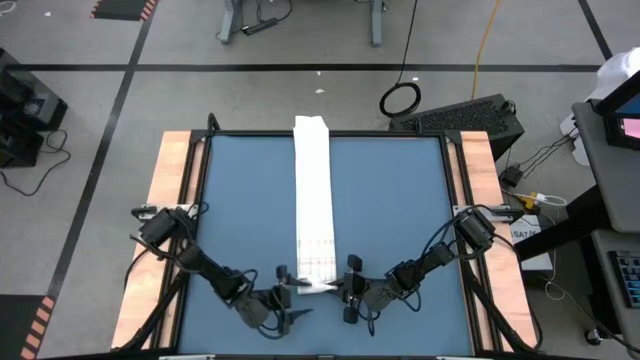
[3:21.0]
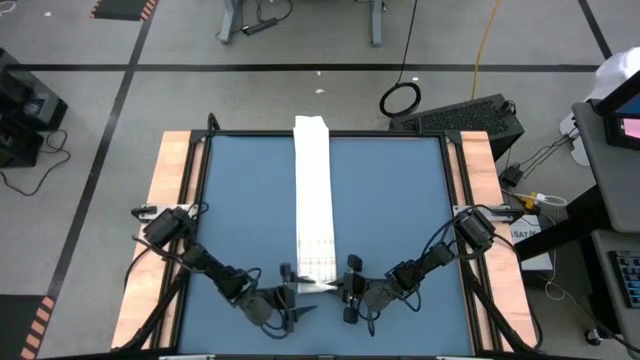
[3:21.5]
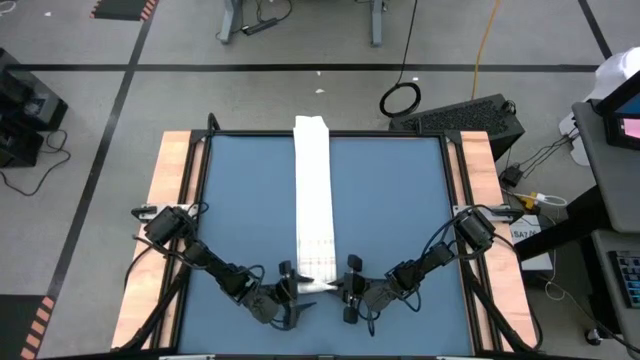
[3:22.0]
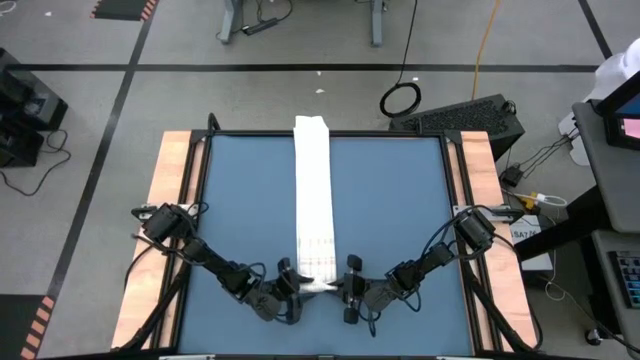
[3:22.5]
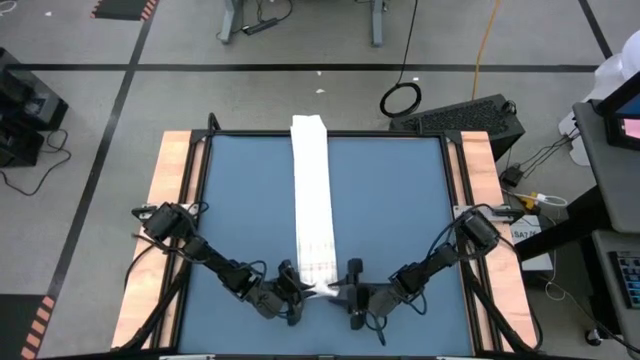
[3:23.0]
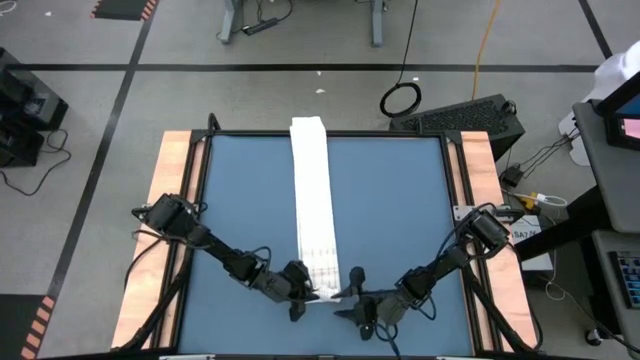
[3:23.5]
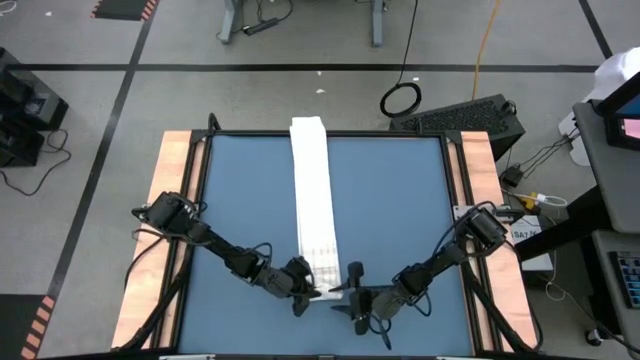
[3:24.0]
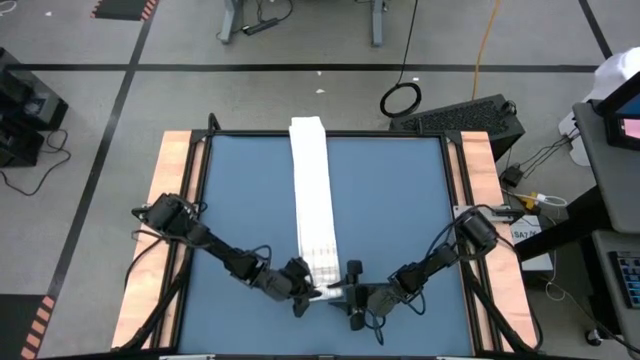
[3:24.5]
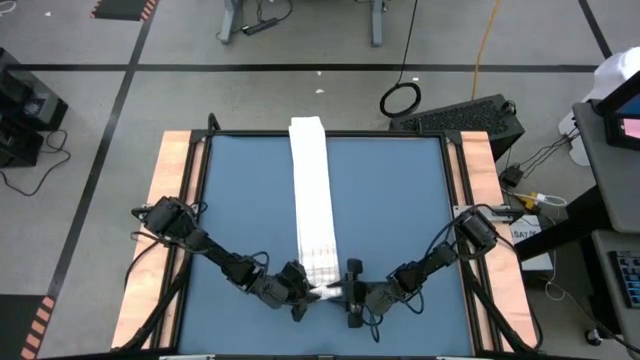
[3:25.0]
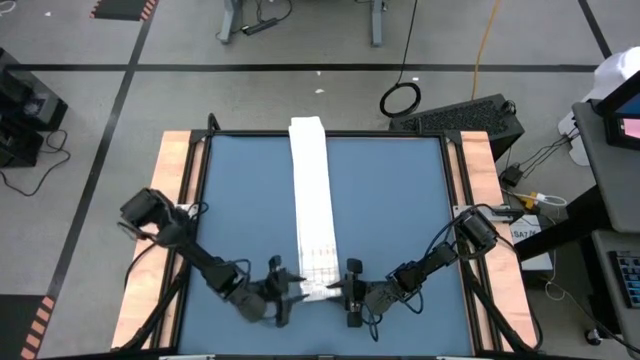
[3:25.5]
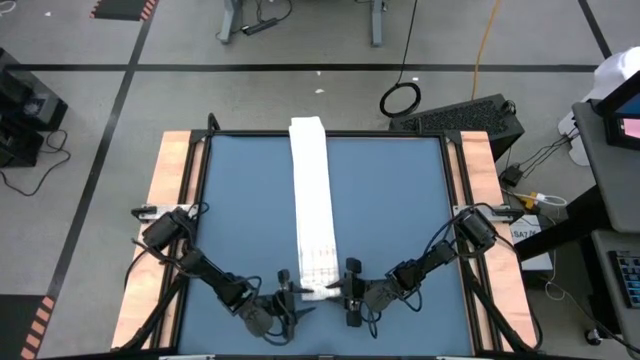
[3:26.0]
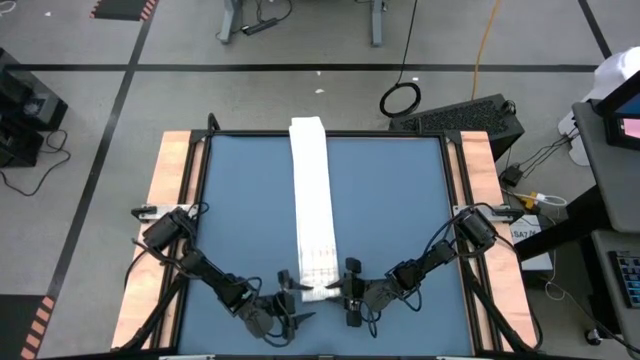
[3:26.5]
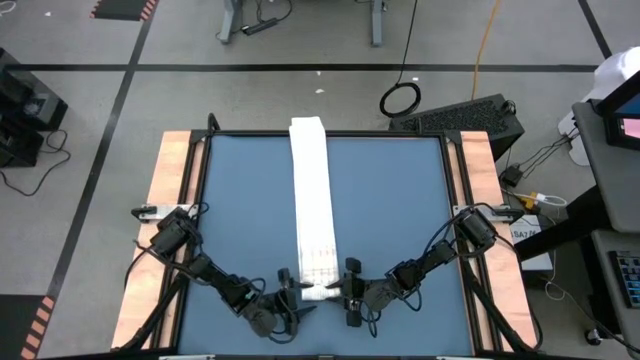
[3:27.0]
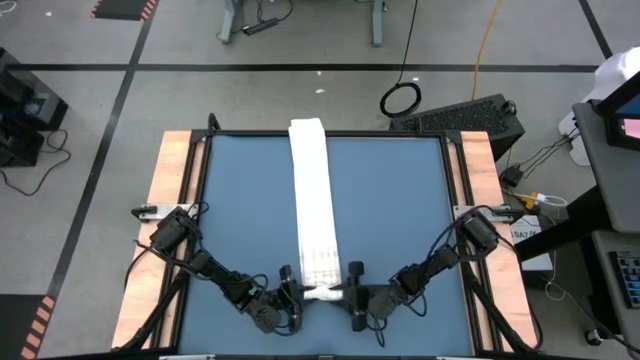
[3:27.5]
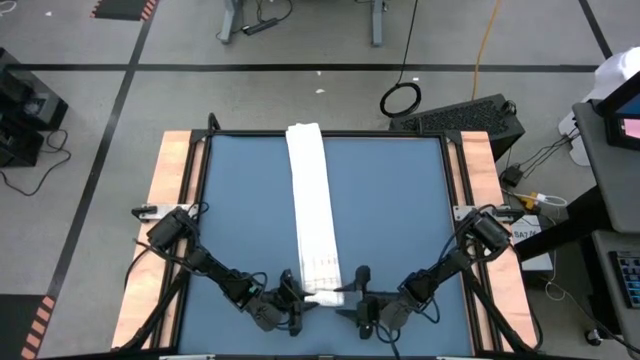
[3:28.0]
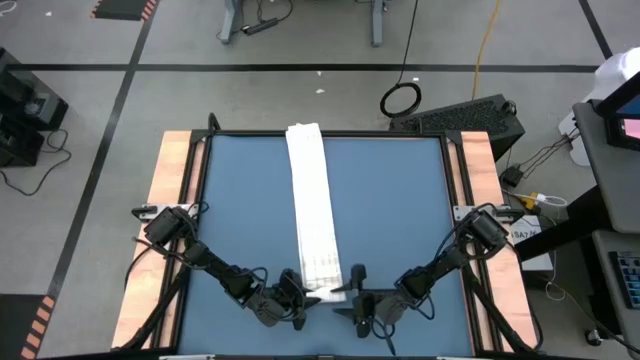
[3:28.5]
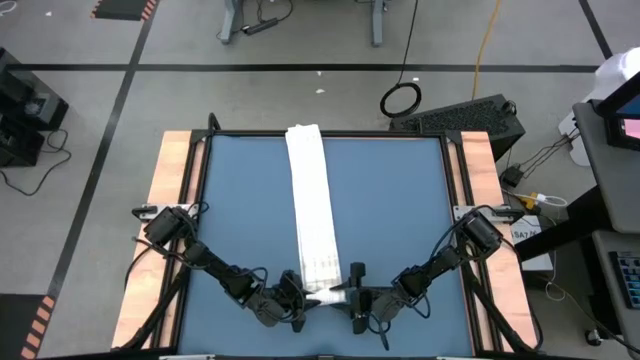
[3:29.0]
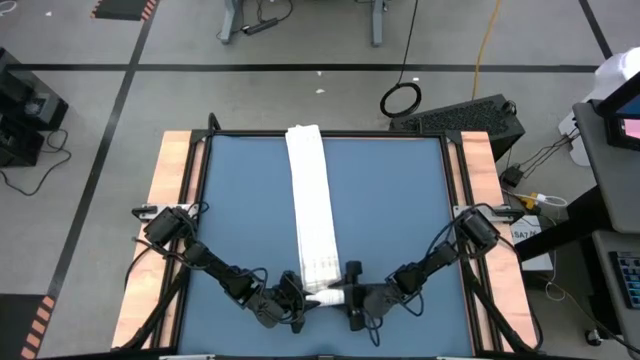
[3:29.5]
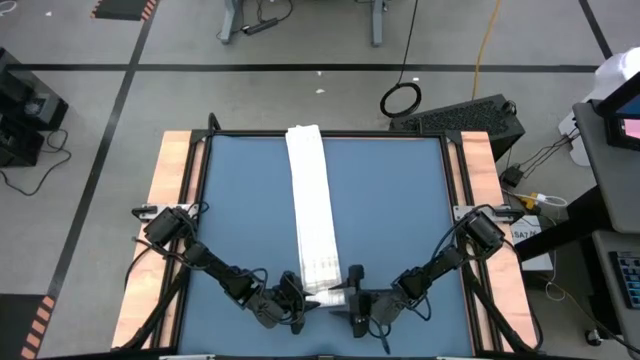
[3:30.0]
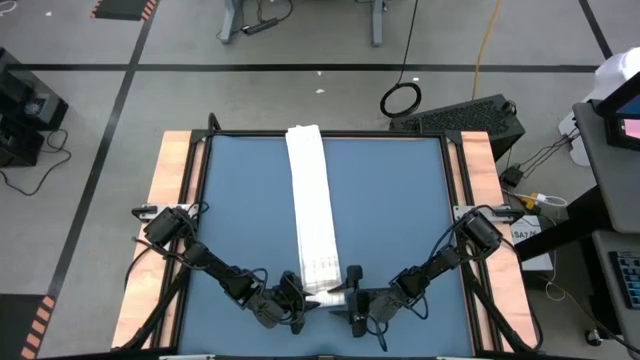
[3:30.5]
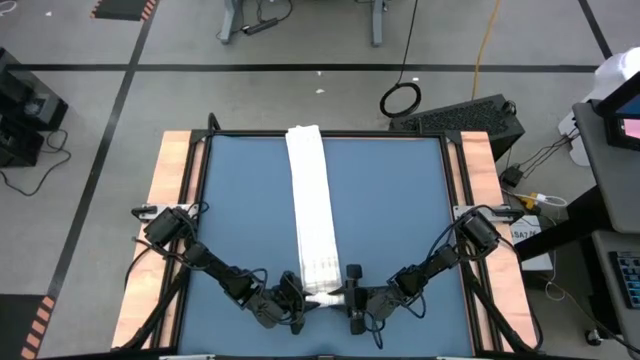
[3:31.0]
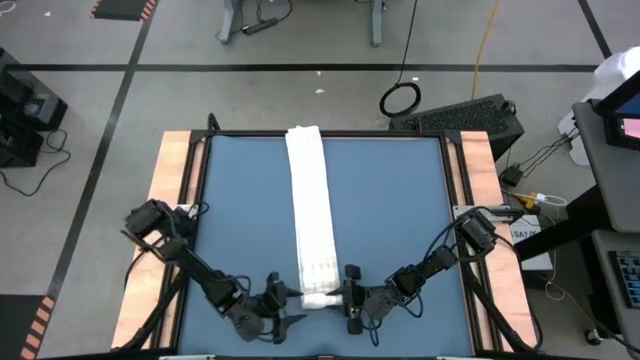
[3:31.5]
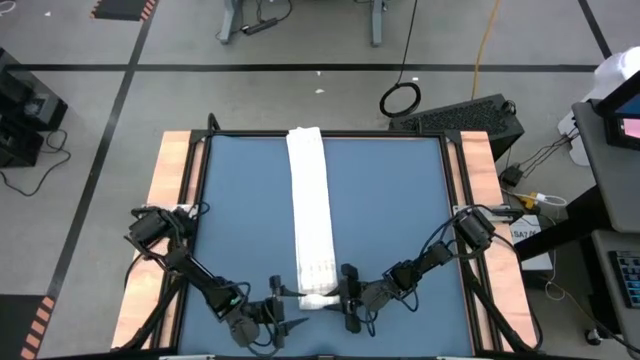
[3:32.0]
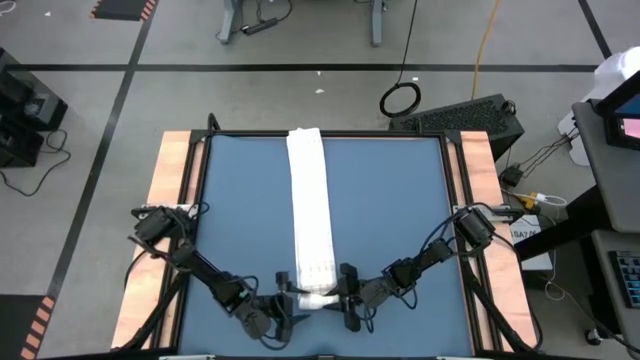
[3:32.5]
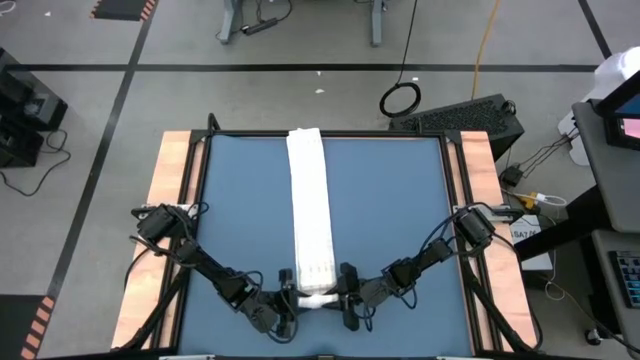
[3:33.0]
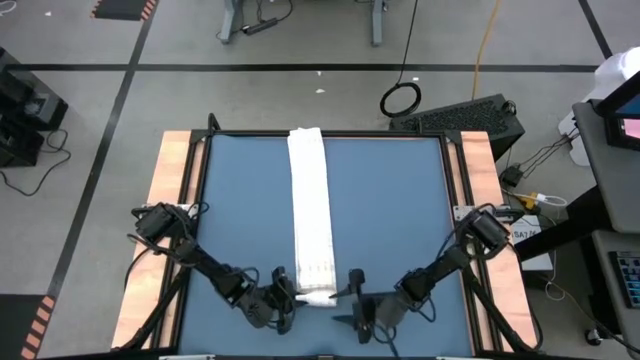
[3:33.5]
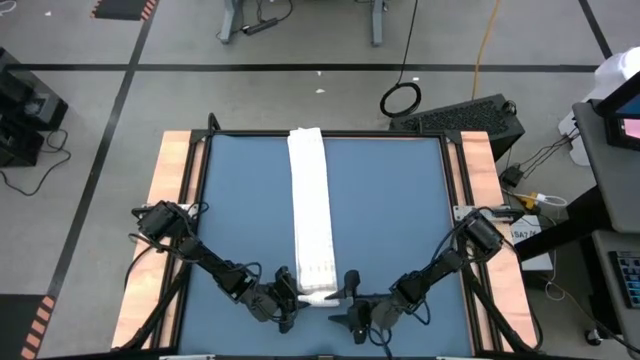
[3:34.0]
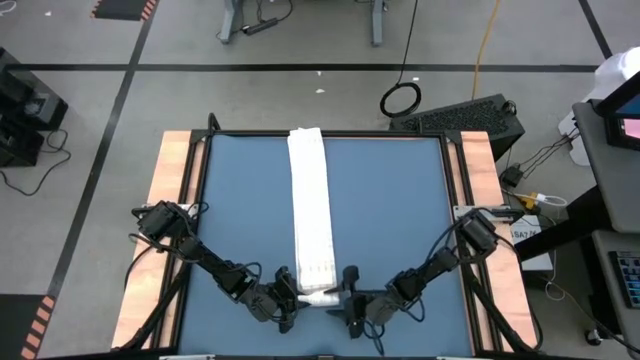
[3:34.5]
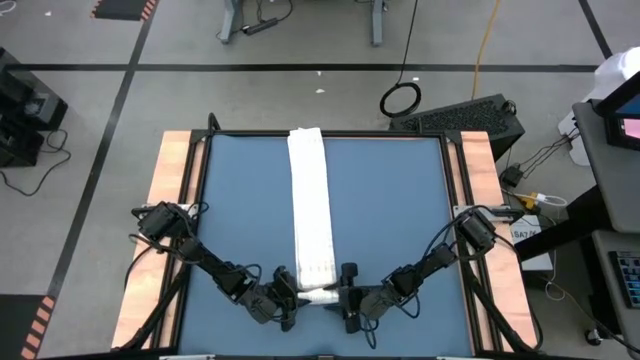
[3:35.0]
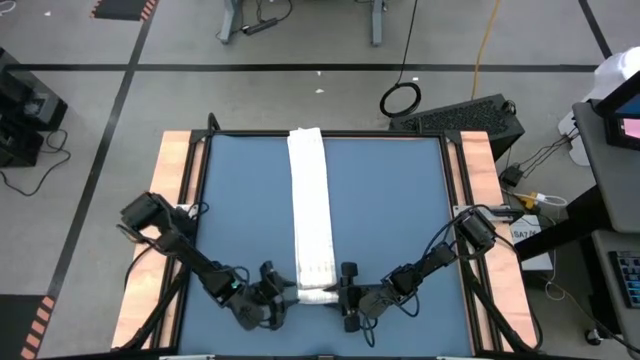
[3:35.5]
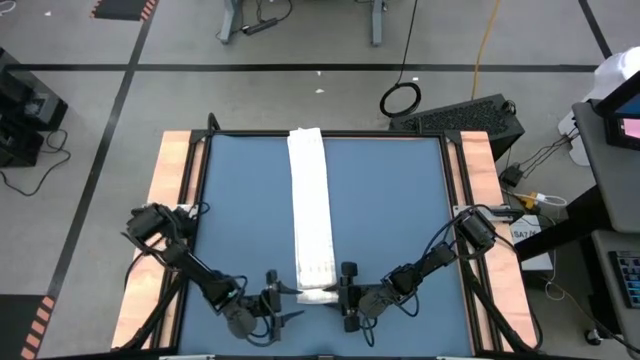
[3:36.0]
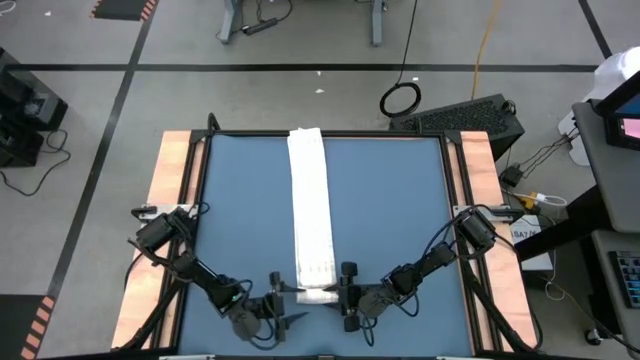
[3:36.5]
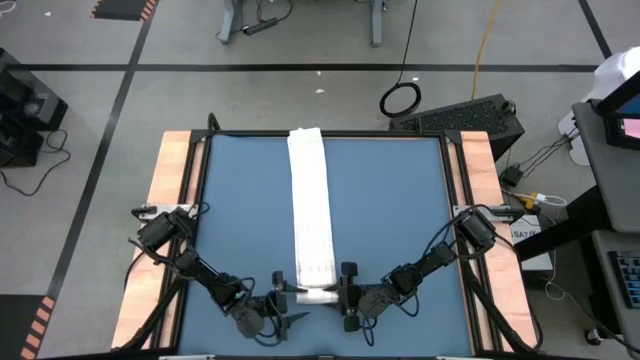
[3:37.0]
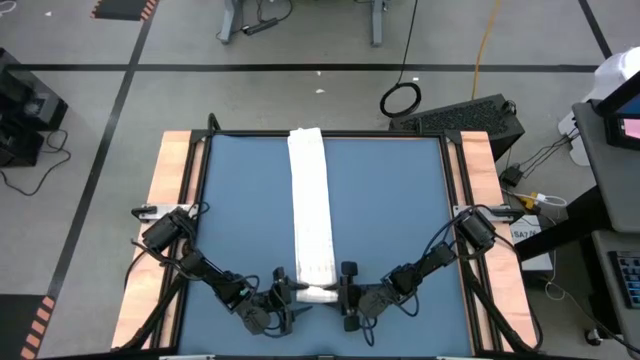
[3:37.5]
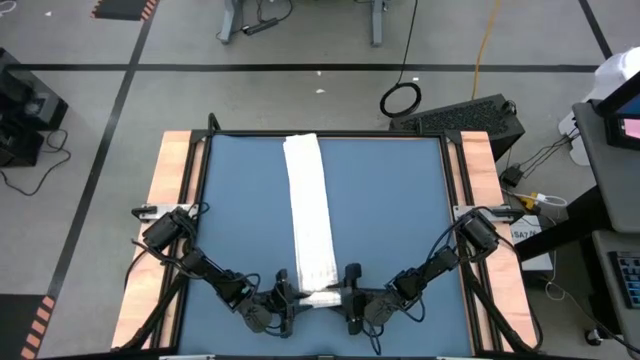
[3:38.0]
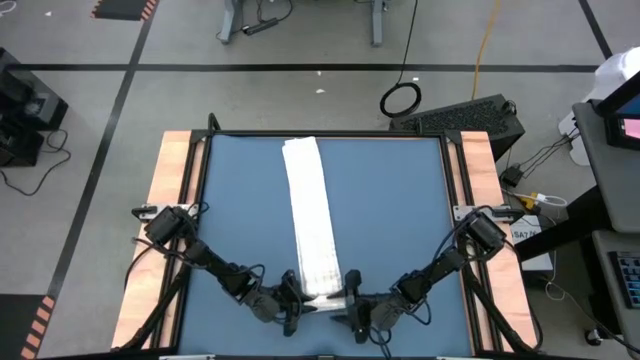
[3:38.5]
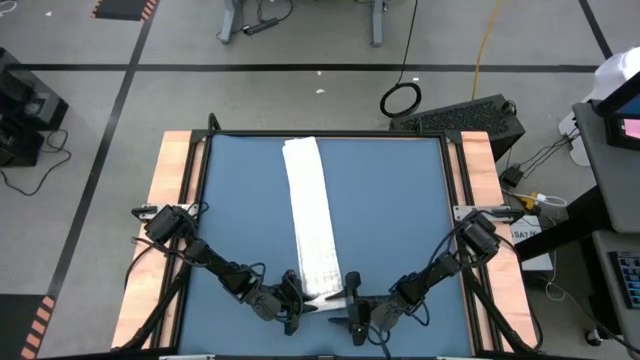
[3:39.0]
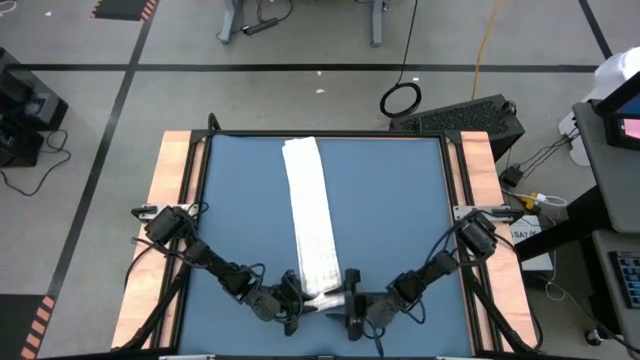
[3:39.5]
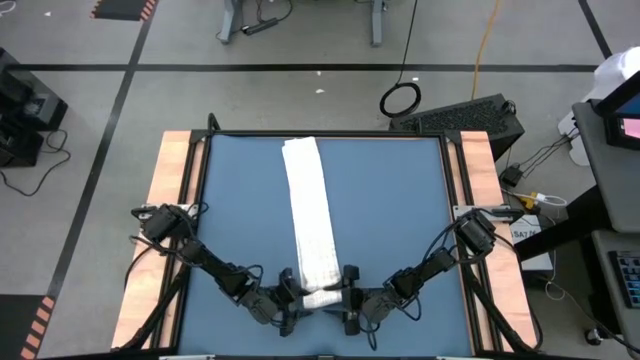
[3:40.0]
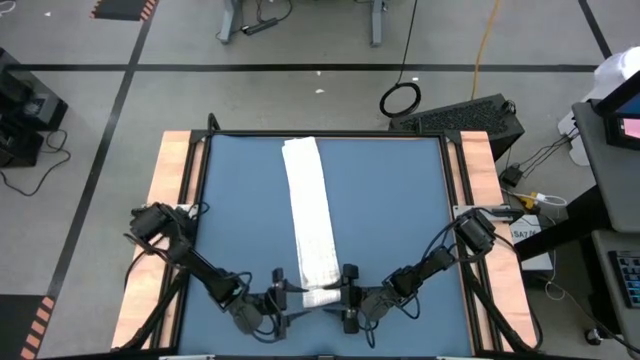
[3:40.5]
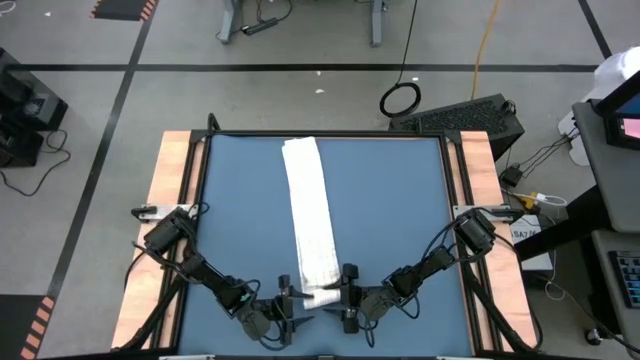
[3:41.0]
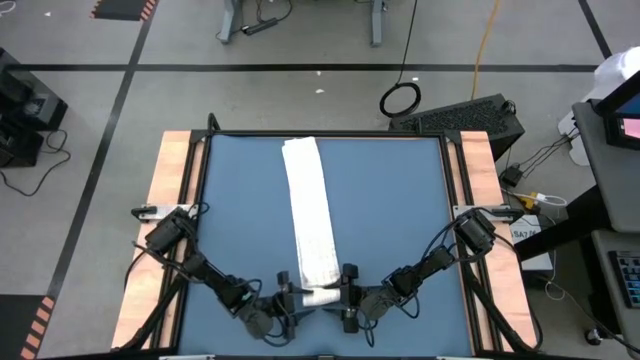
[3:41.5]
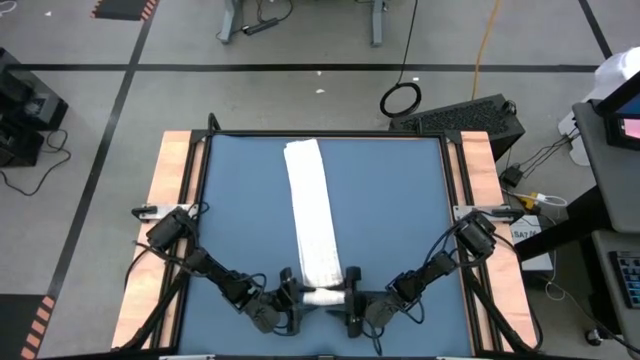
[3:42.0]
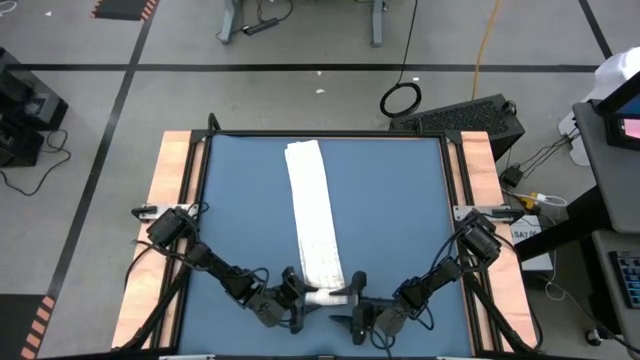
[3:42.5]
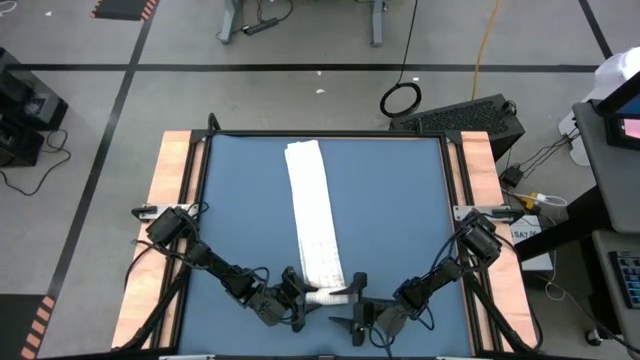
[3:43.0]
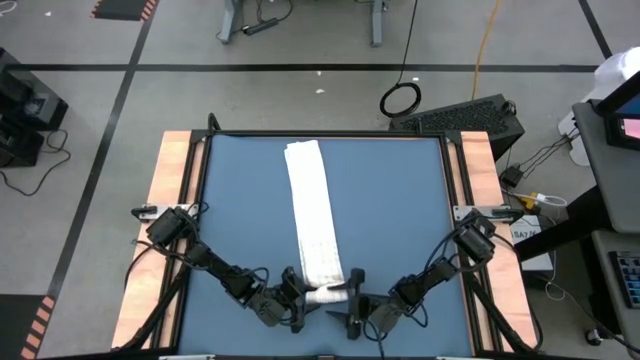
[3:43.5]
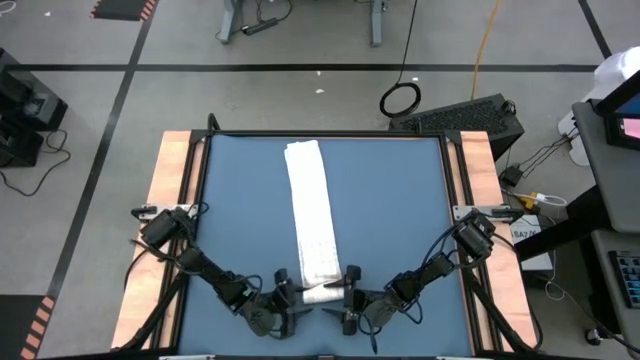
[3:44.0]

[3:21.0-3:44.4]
Task: Roll towel into tight, uniform cylinder
Roll the white towel
